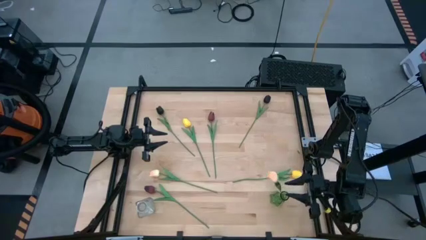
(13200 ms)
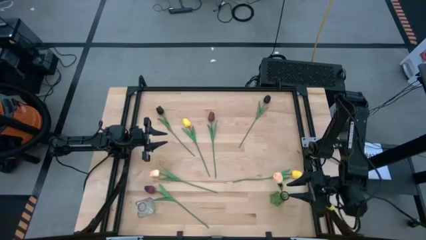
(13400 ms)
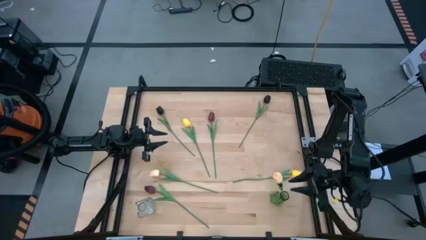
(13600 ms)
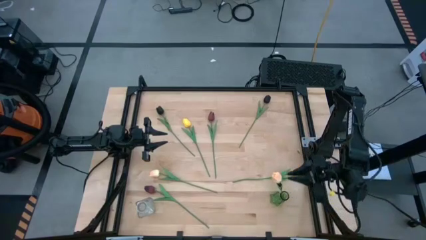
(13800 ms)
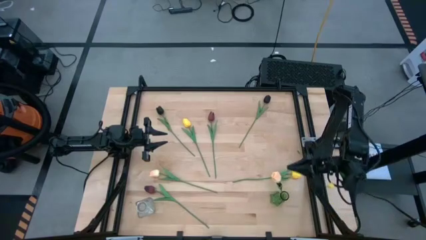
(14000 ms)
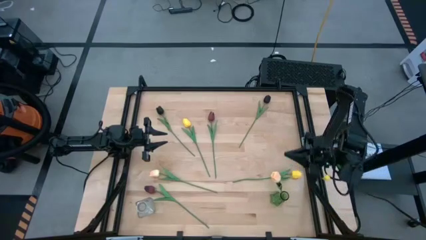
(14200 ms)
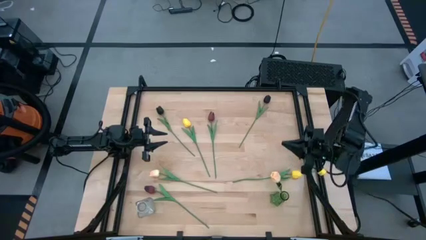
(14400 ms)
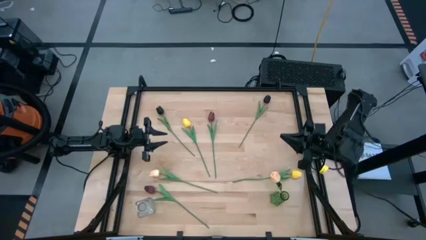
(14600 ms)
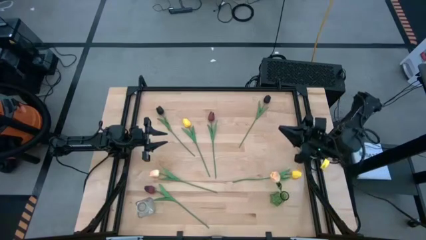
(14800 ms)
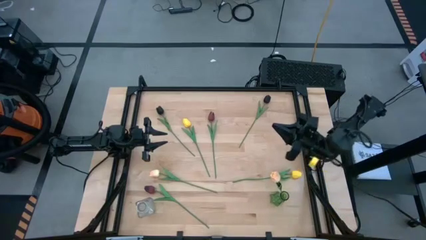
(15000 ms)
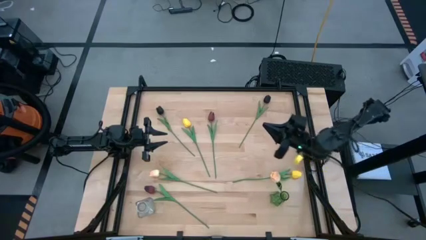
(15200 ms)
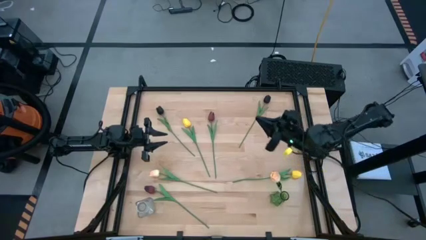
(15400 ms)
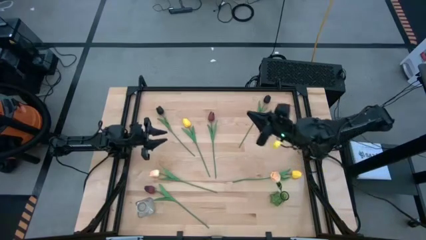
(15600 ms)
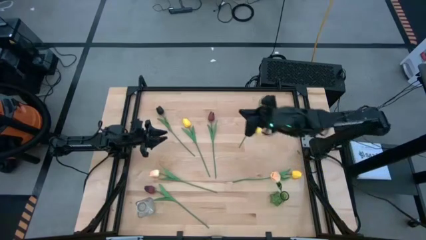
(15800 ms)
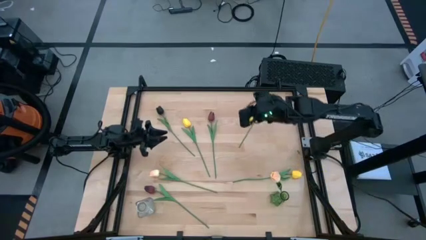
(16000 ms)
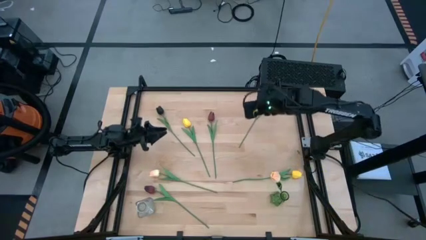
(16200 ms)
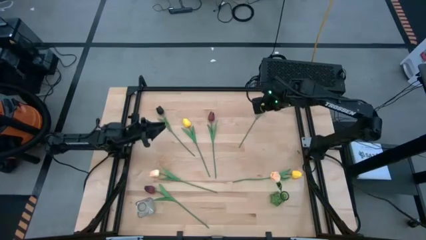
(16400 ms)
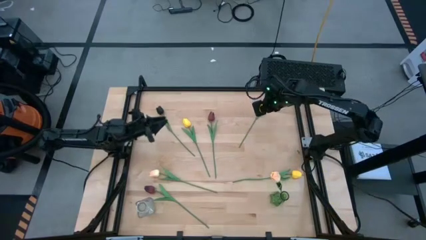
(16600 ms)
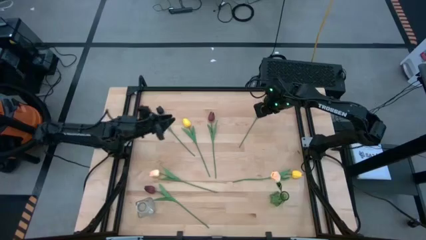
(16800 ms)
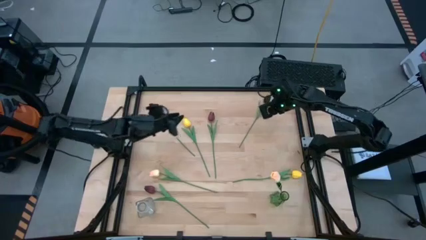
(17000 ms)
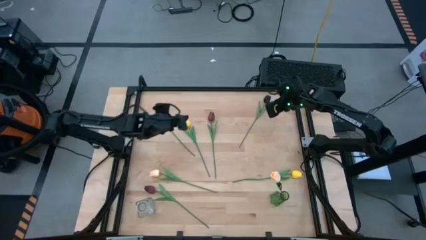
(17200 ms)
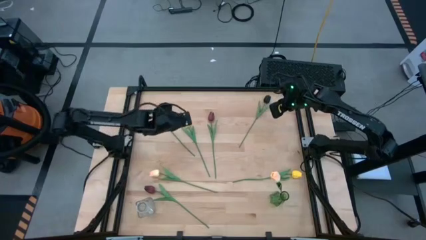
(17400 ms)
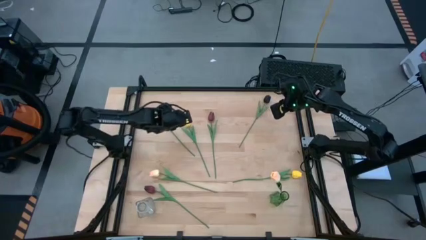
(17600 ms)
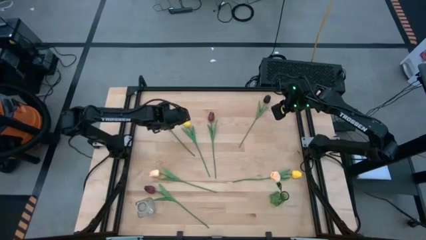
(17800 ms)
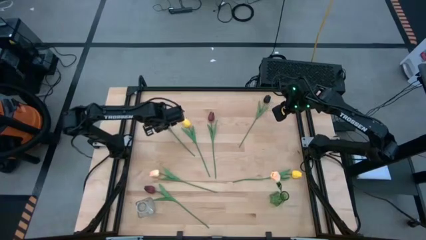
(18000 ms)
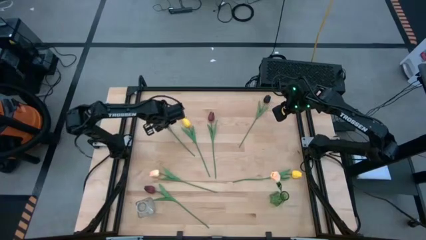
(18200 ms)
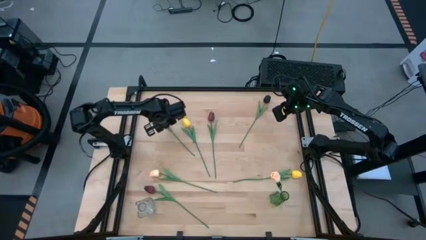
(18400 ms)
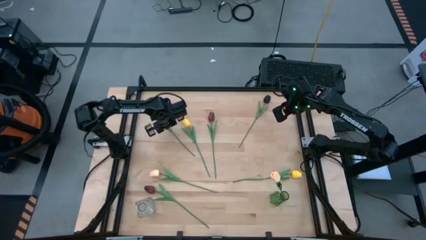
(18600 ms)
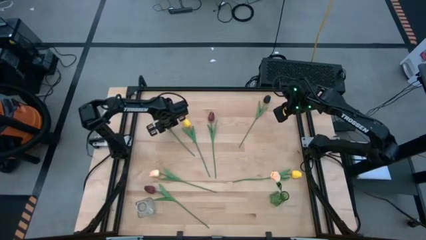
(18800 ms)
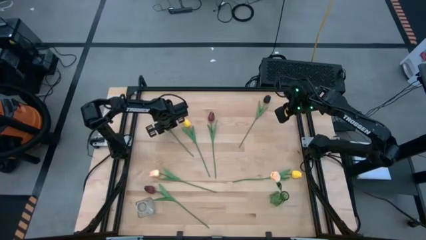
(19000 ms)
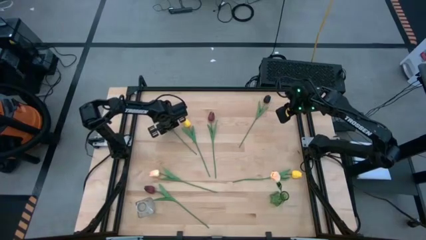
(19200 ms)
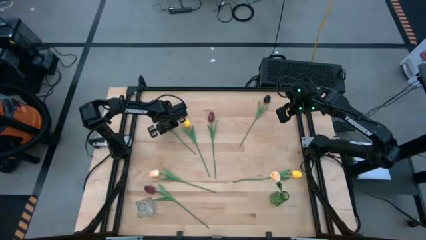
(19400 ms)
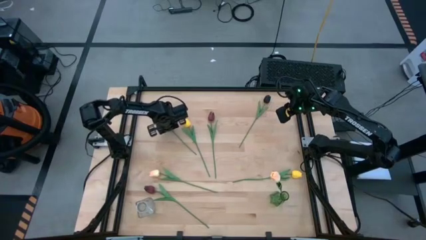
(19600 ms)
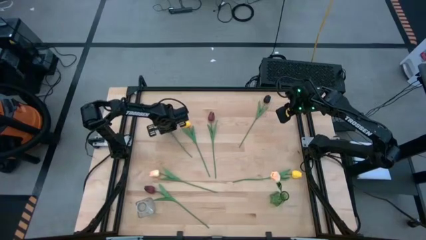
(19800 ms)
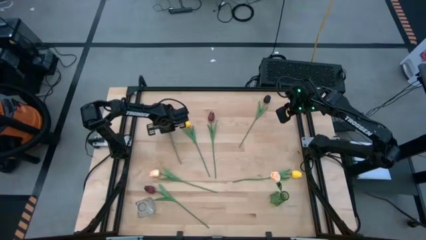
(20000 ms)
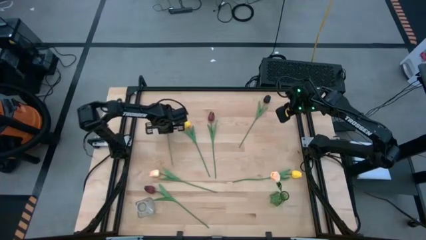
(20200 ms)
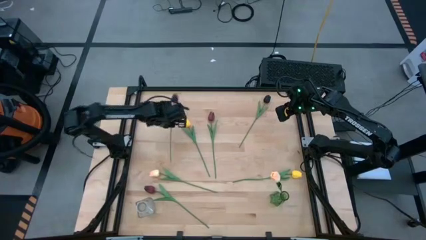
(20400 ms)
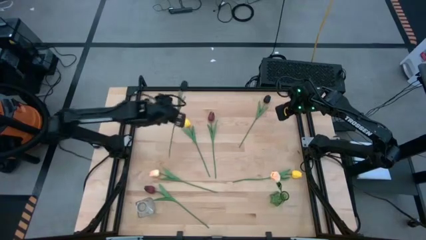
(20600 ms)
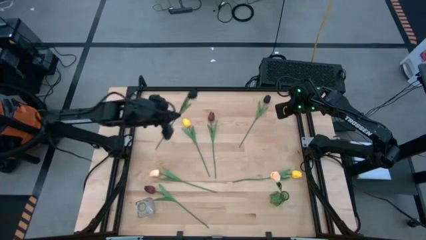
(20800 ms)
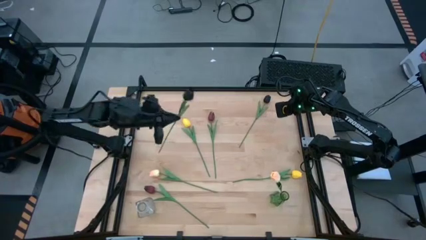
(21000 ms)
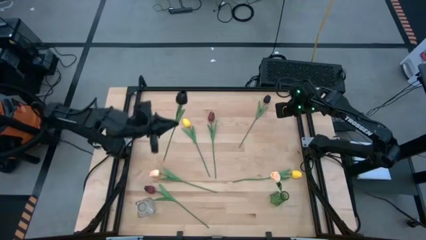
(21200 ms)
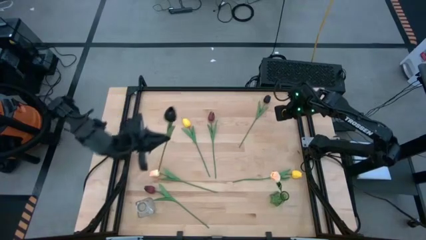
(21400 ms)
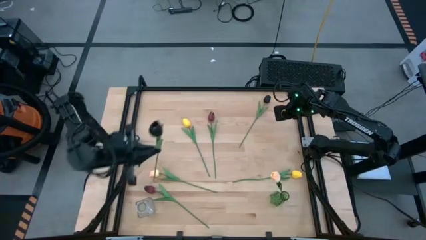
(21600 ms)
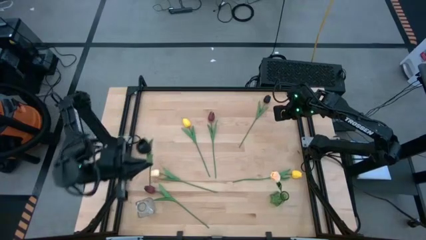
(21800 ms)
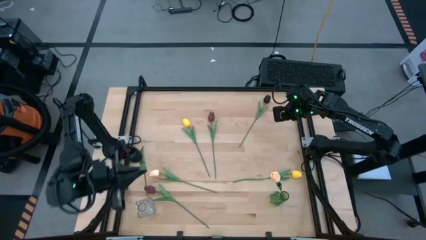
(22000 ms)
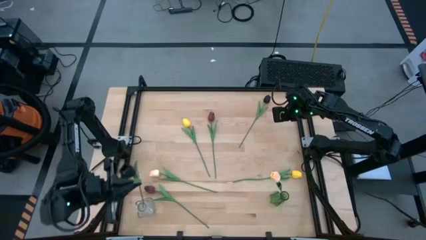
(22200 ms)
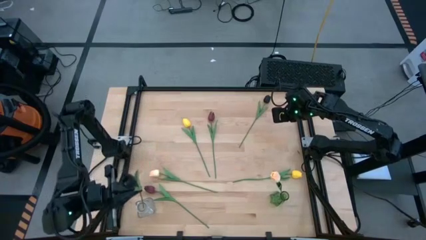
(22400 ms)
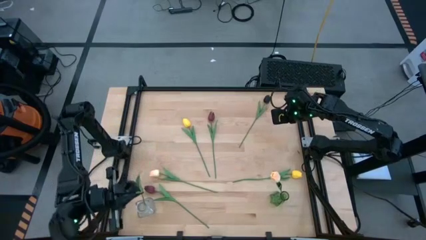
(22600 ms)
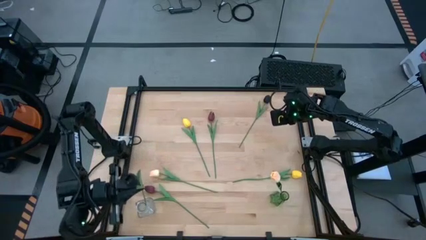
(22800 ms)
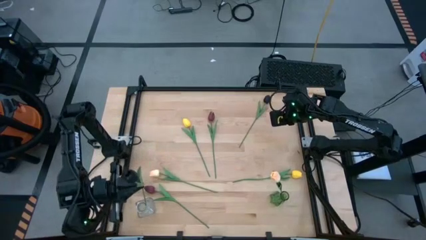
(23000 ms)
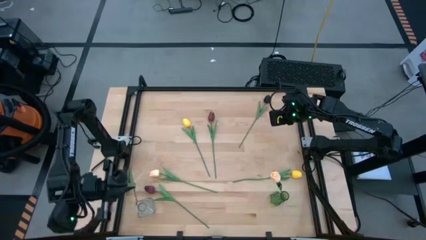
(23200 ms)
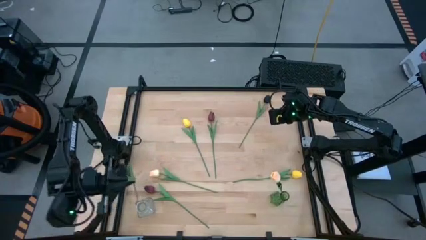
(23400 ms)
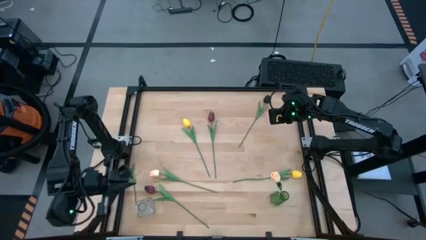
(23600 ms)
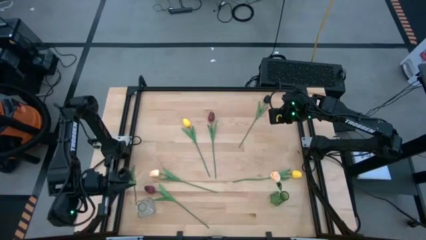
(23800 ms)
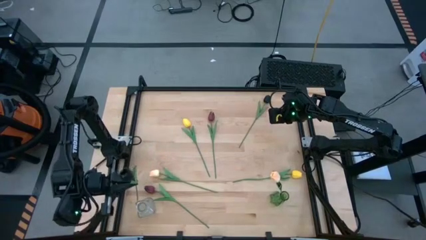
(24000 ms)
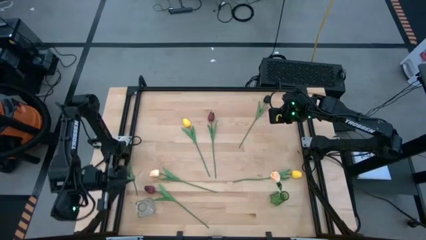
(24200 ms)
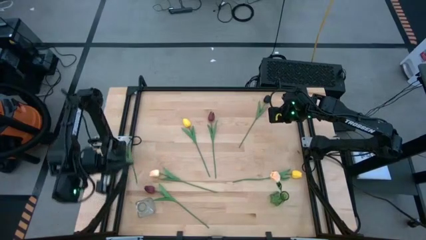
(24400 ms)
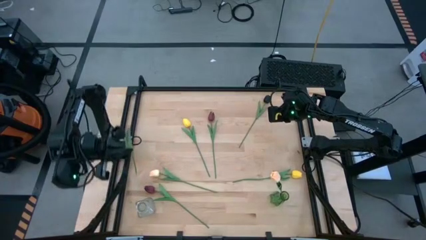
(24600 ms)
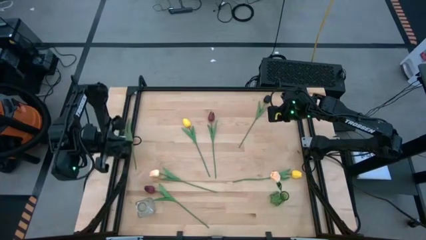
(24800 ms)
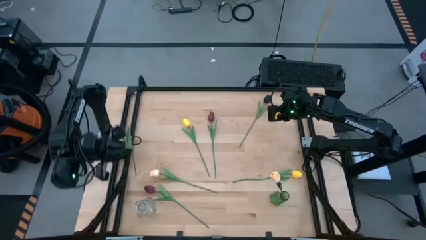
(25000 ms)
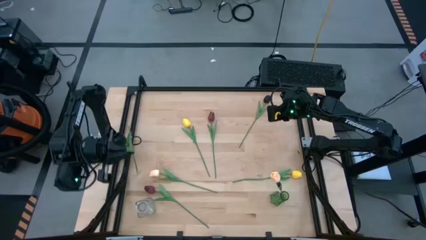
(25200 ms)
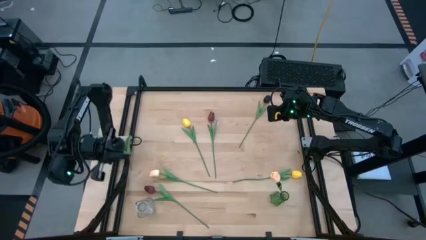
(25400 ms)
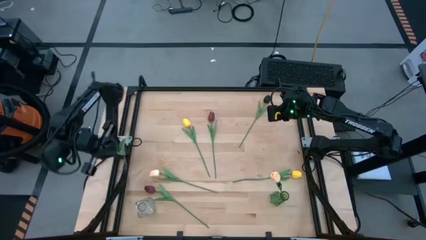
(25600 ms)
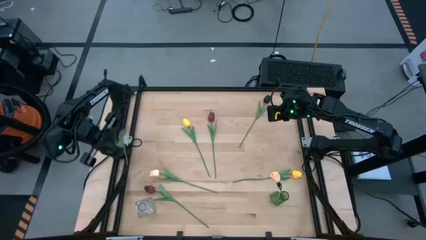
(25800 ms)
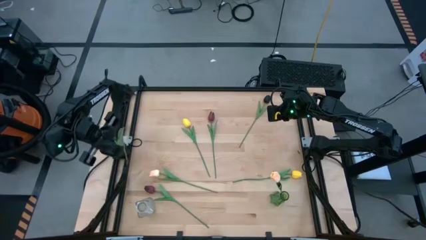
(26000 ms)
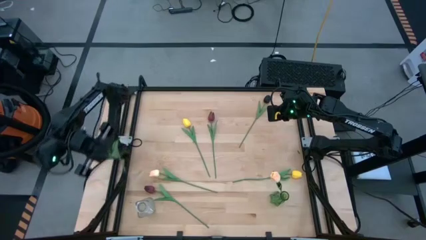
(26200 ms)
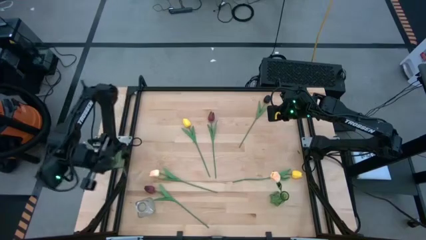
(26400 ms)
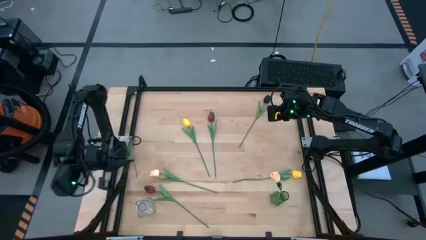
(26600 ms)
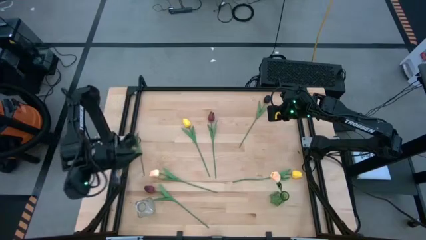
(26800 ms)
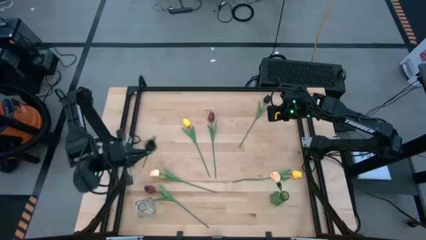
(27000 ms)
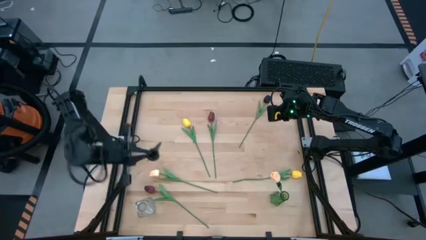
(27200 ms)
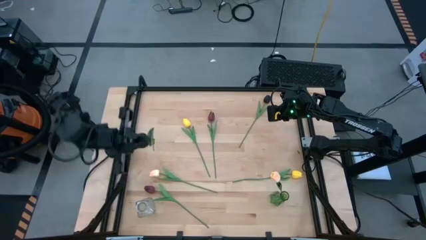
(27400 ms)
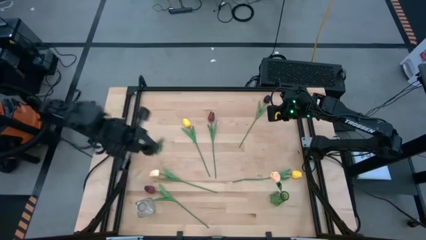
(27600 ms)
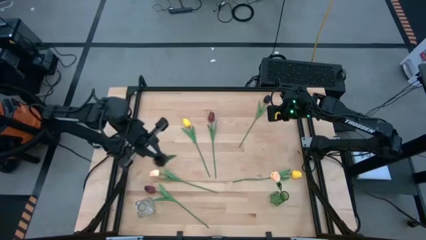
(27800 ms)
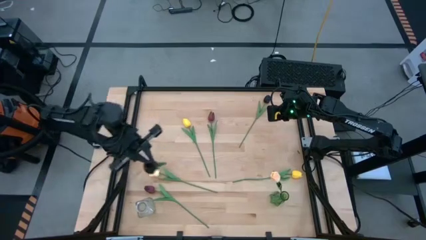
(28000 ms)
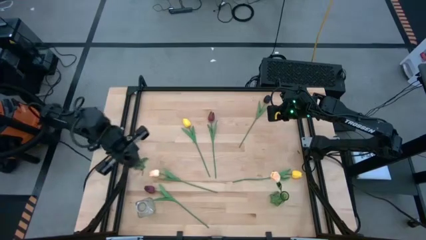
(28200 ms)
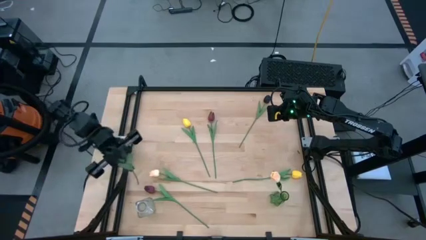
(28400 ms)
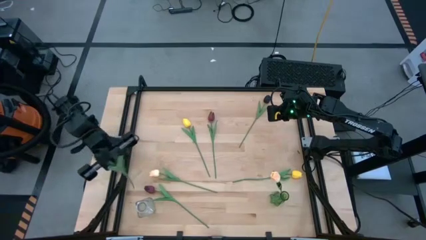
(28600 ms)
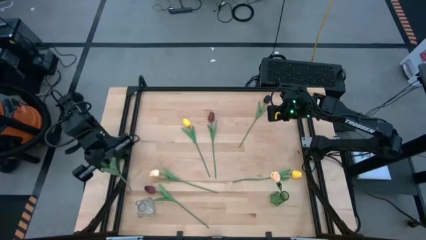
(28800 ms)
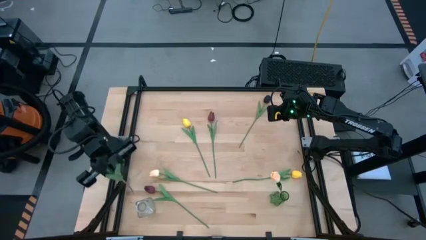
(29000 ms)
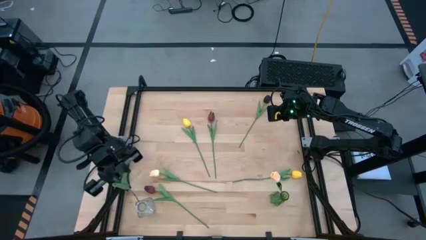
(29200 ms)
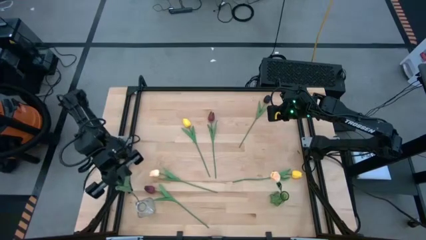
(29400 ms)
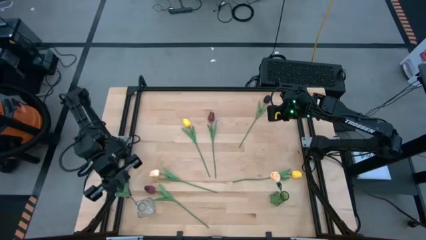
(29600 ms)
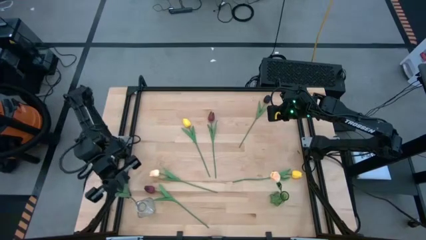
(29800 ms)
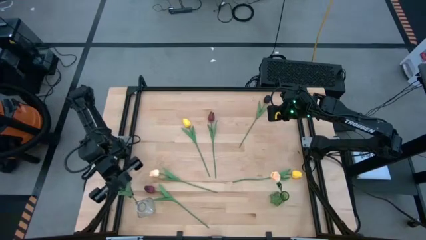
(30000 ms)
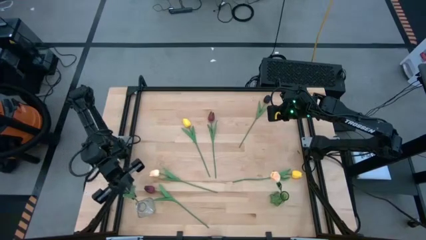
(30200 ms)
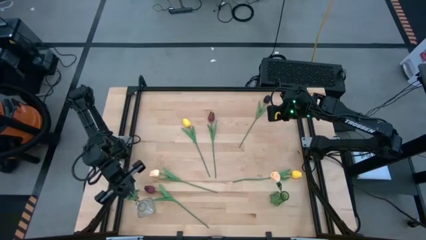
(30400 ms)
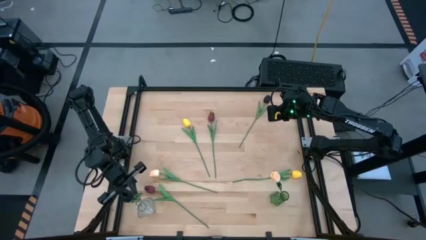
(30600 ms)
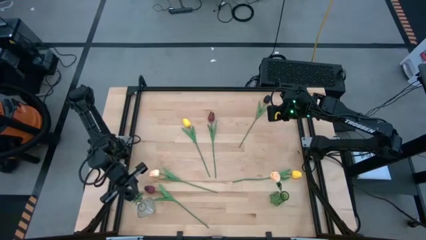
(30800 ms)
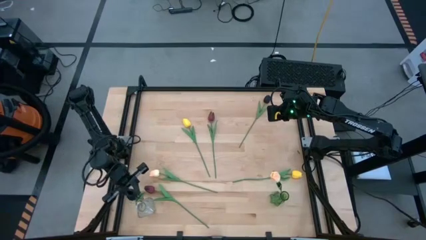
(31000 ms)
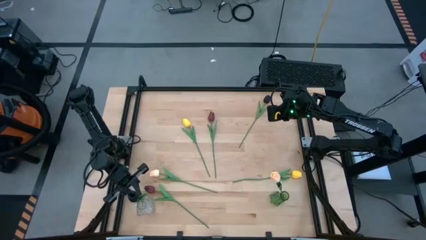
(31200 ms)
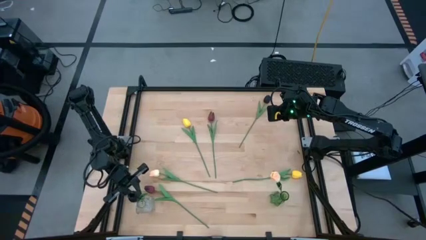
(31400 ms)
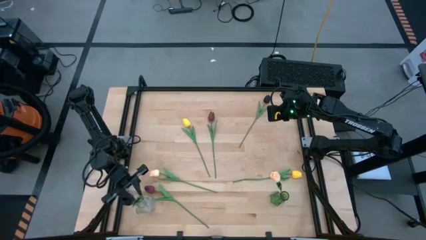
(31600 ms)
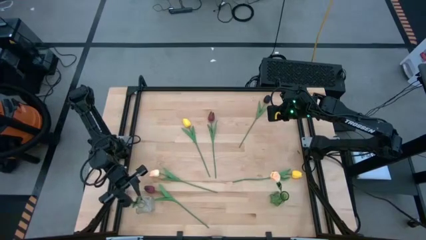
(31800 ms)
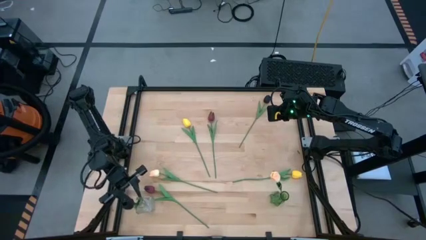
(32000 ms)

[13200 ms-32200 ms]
Task: Sort flowers into vase by color
Put the left black tulip into the transparent vase
